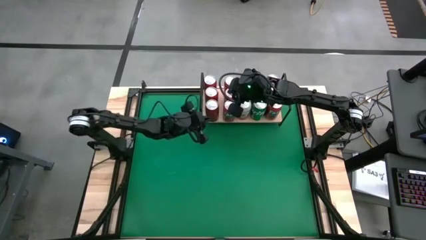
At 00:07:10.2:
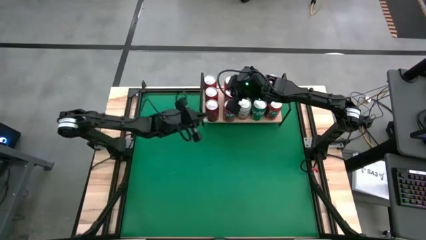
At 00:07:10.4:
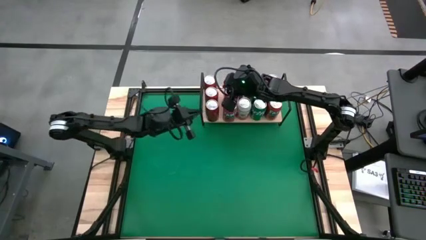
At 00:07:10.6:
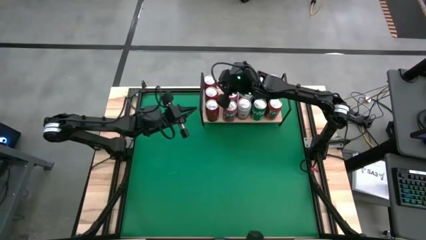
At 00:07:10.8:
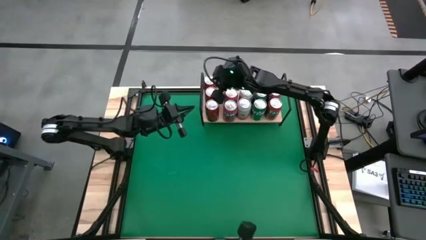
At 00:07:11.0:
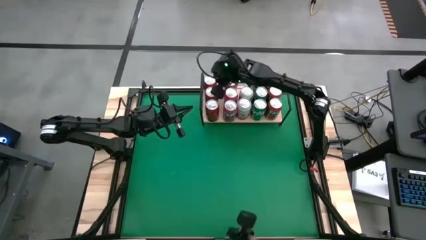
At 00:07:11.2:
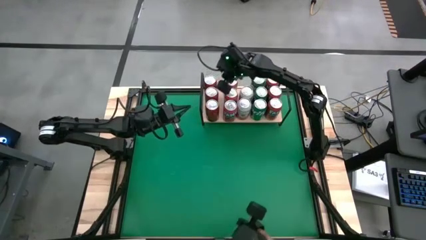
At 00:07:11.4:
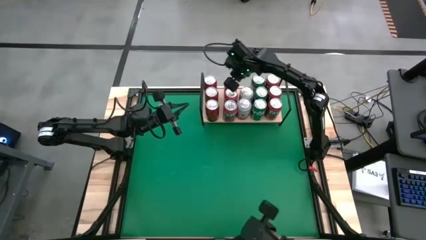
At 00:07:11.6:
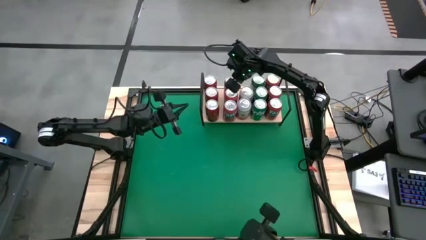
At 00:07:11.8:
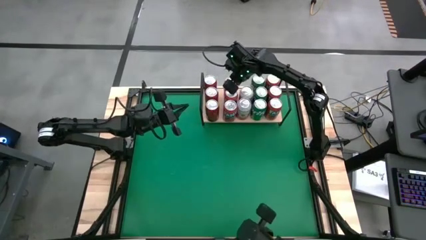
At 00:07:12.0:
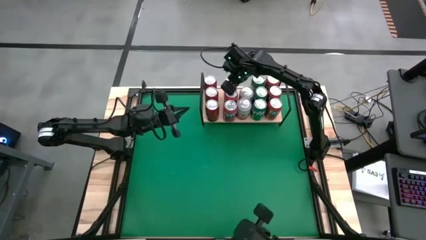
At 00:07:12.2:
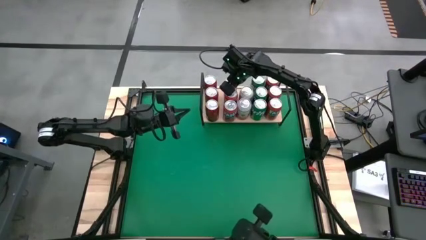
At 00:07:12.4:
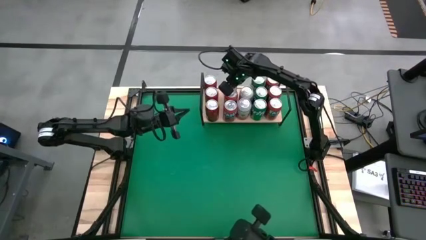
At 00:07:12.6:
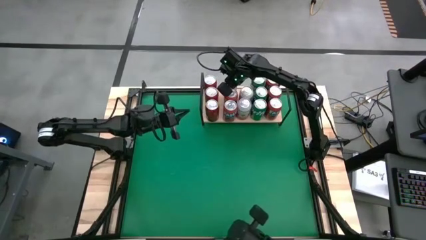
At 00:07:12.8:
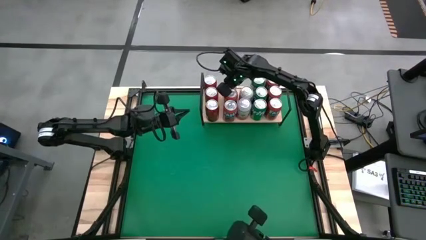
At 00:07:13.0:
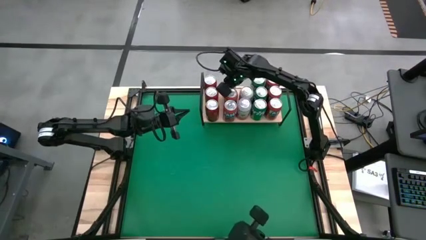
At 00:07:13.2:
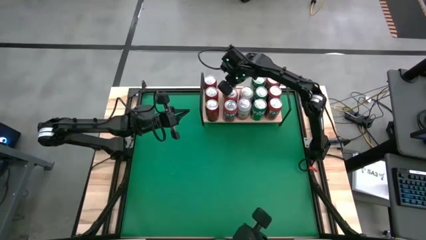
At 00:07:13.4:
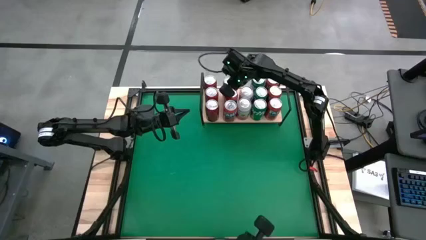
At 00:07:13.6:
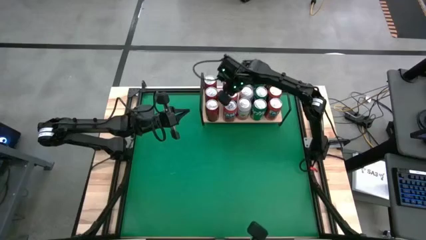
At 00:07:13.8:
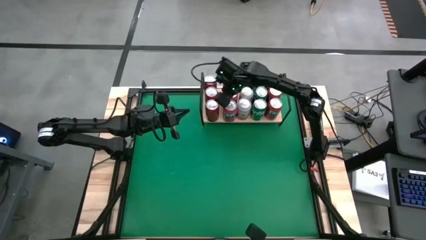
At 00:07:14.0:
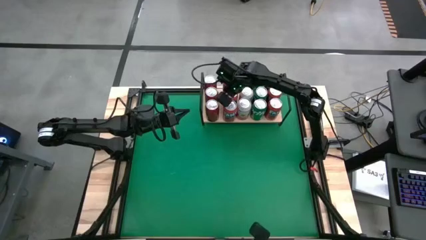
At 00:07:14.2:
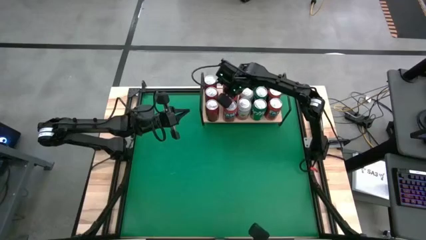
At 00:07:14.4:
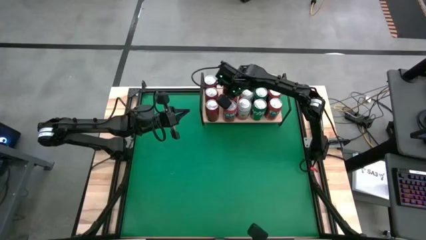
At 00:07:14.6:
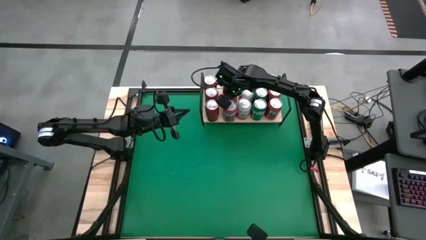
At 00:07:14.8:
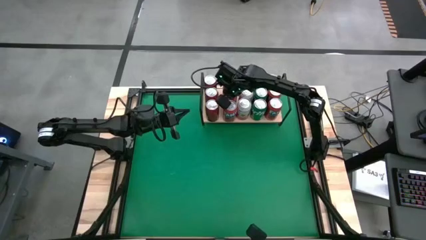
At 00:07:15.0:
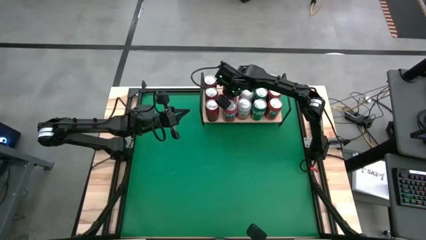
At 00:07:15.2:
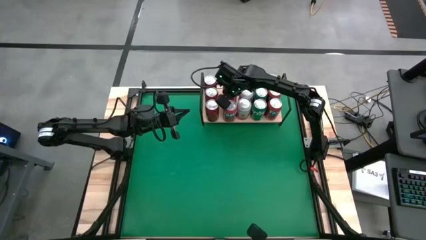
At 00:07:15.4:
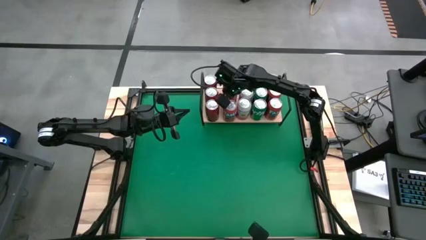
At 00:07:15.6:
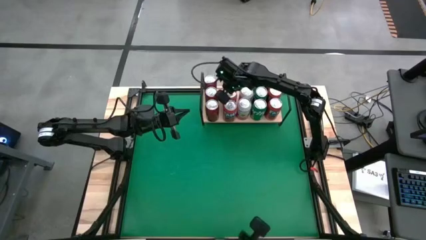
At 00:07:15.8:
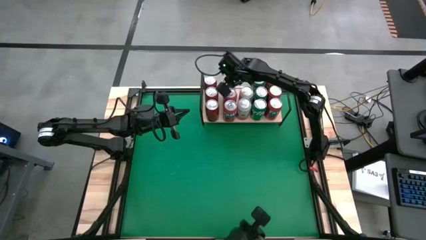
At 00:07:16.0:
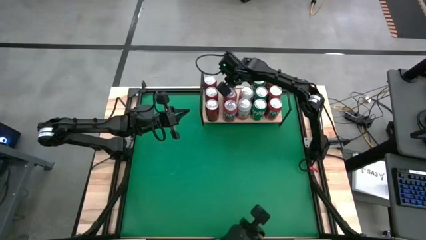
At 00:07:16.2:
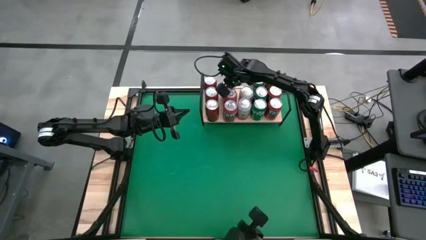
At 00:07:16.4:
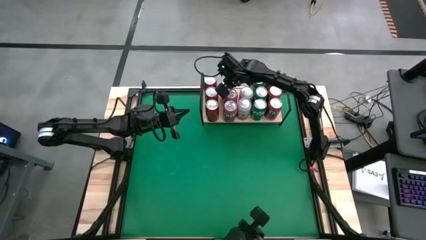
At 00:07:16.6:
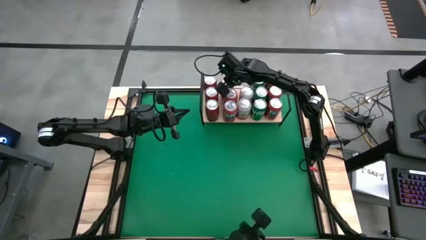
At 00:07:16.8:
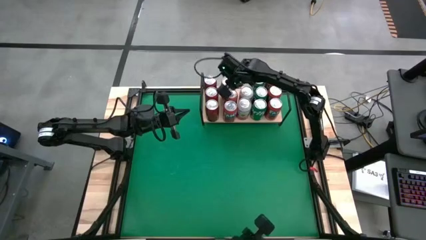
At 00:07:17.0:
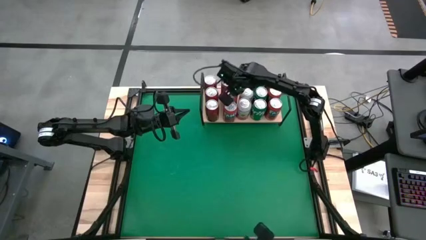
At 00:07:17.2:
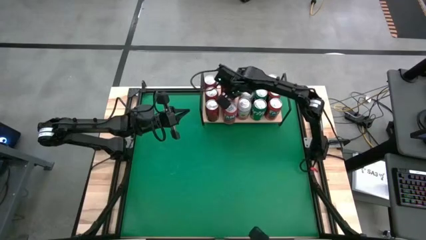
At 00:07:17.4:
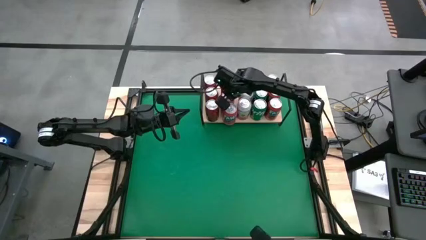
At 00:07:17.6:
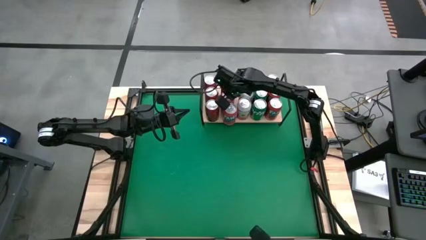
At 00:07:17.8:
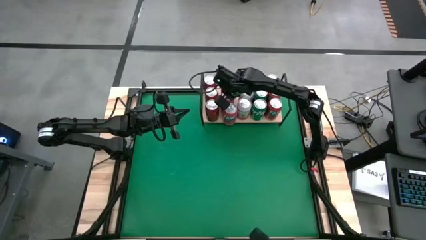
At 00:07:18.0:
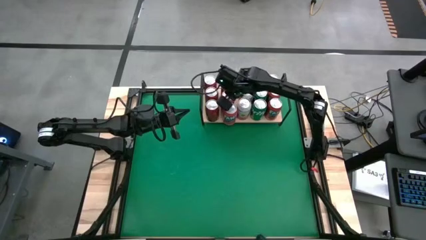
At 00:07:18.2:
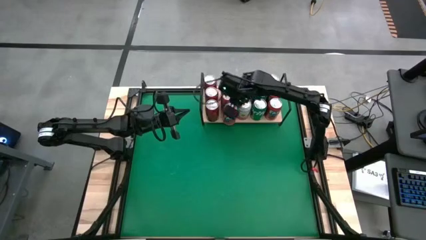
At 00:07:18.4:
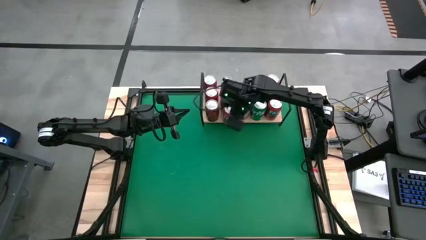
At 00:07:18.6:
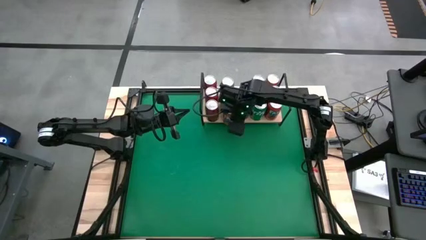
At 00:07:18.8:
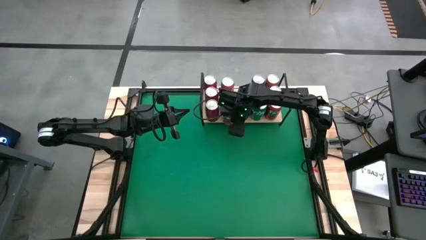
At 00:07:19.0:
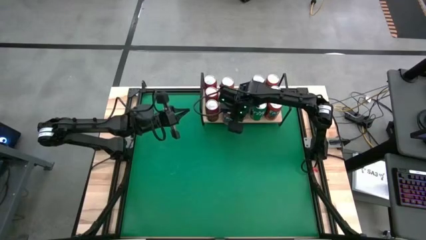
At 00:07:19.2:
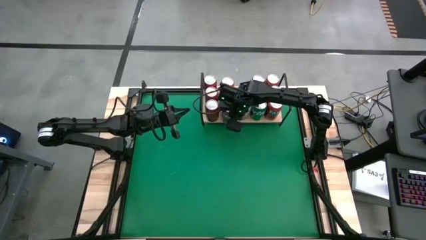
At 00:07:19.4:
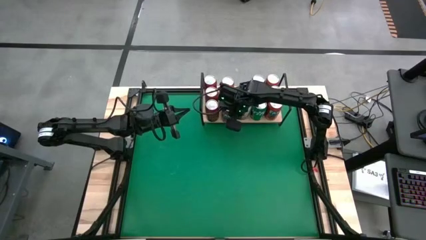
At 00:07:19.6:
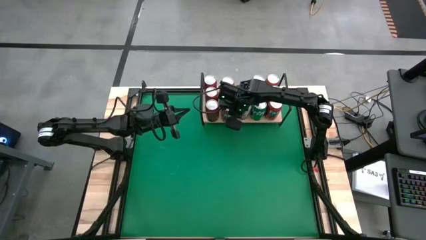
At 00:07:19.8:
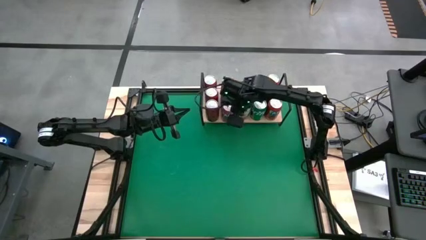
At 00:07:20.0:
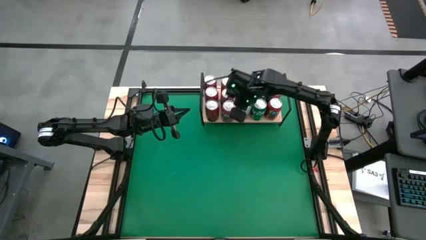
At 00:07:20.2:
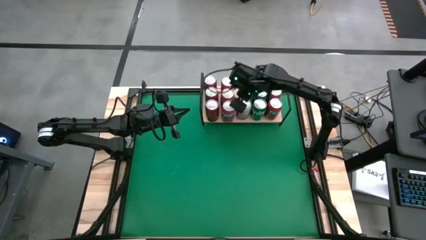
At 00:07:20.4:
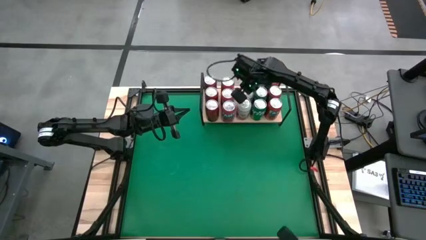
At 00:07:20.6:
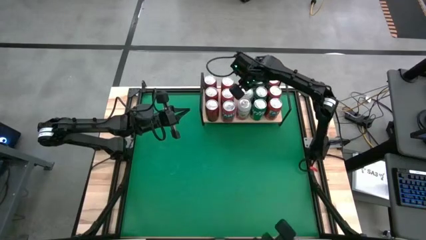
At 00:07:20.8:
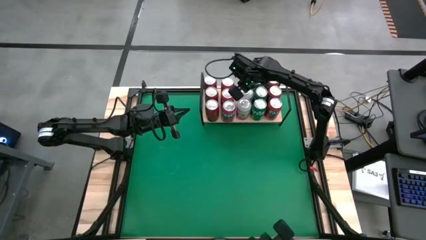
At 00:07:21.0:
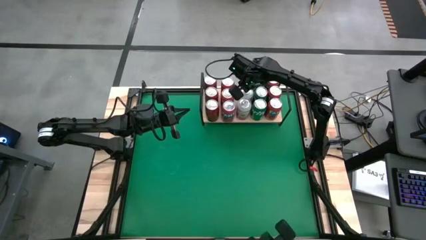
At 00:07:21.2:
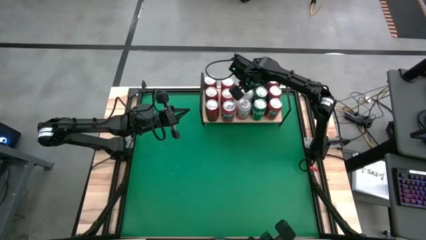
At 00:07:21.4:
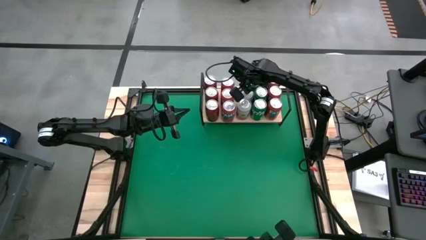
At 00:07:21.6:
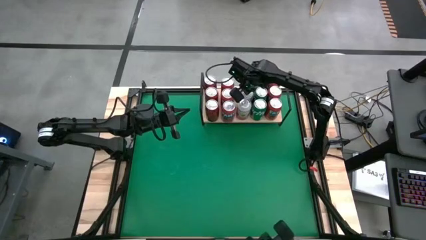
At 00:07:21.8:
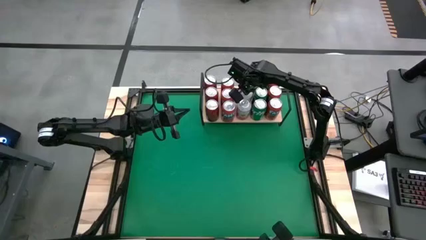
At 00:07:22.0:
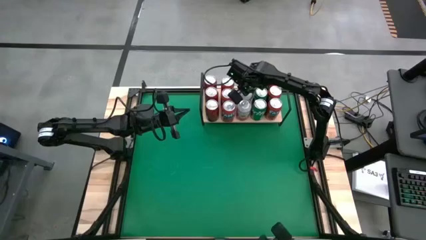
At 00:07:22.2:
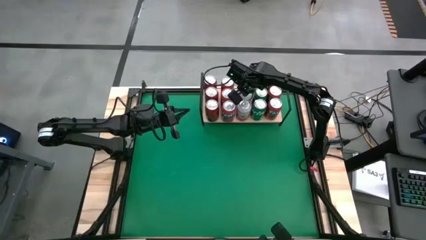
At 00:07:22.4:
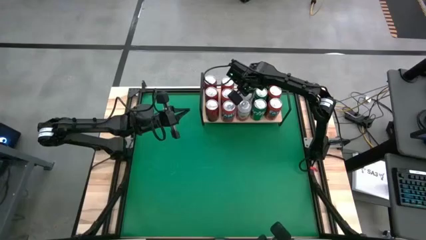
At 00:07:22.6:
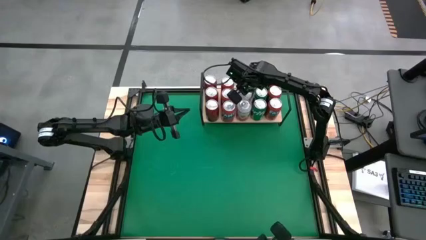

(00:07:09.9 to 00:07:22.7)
Task: Place canned beverage on shelf
Adjust the soda cans on the shelf
